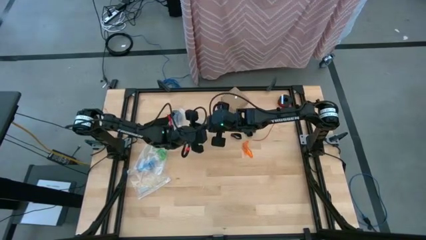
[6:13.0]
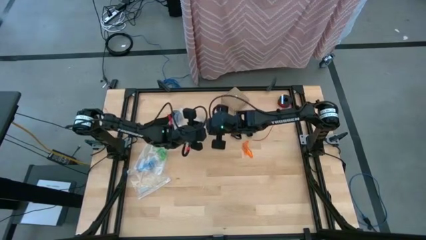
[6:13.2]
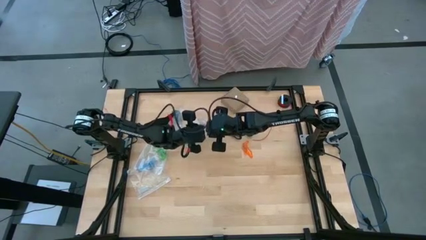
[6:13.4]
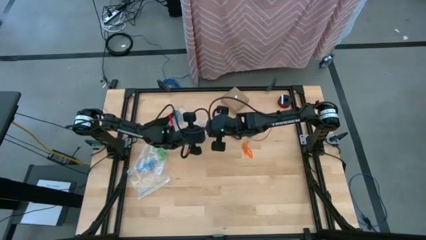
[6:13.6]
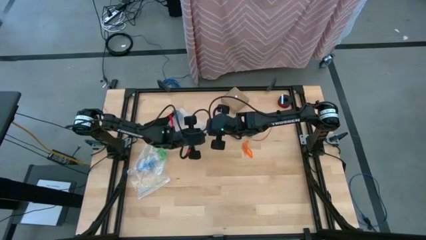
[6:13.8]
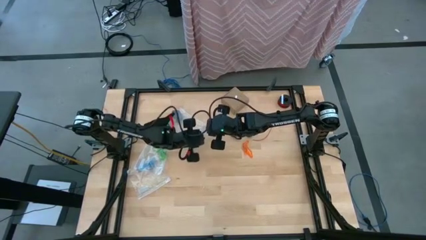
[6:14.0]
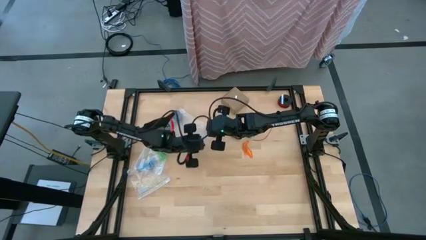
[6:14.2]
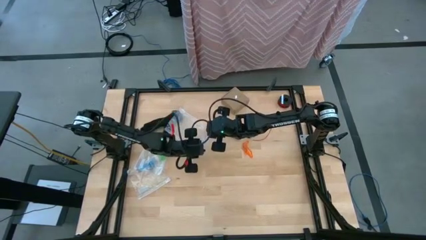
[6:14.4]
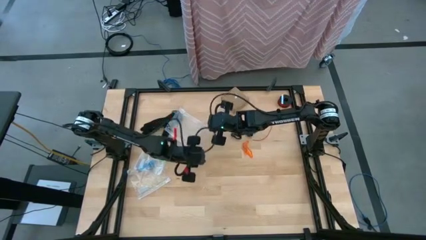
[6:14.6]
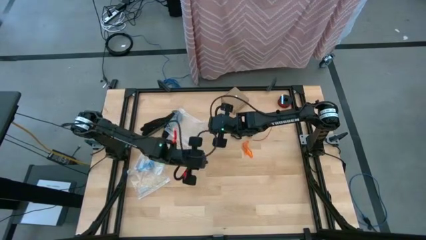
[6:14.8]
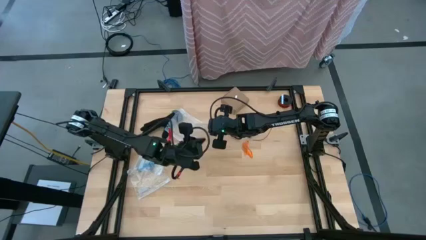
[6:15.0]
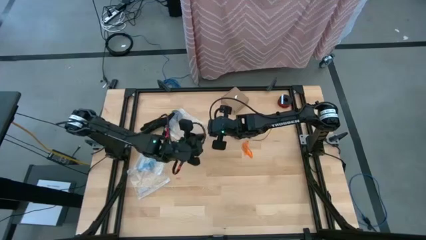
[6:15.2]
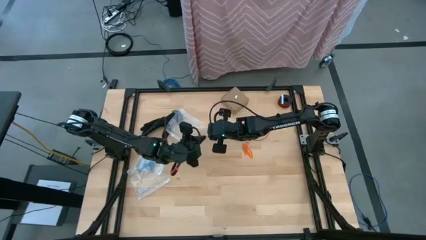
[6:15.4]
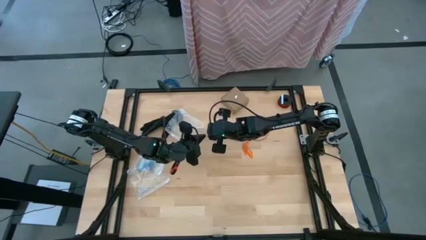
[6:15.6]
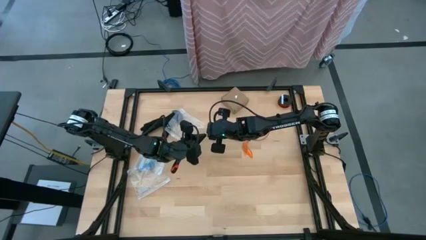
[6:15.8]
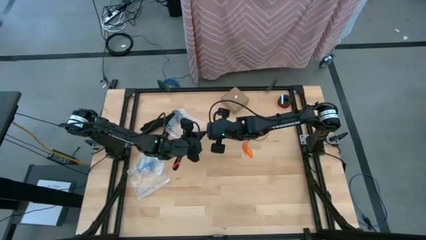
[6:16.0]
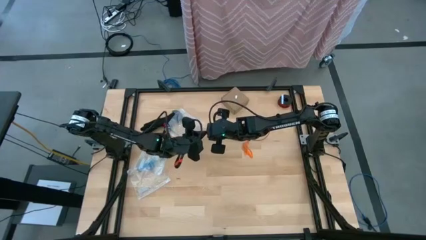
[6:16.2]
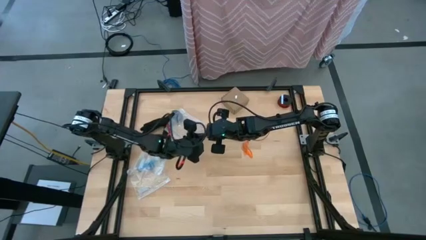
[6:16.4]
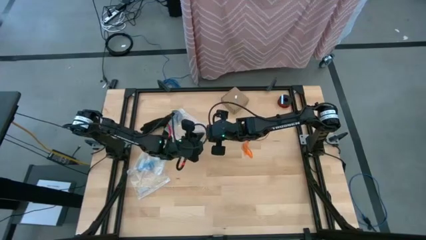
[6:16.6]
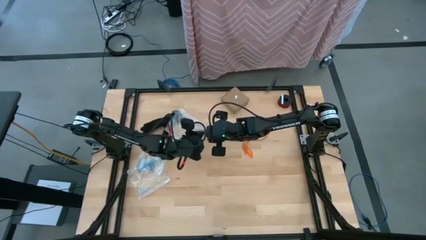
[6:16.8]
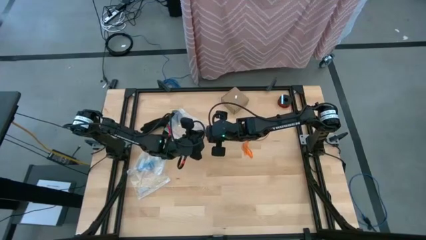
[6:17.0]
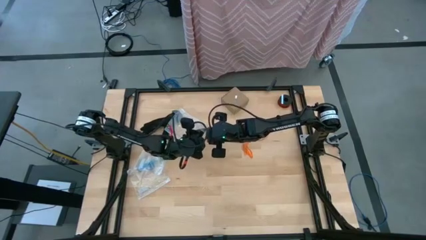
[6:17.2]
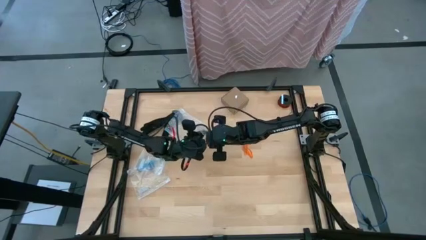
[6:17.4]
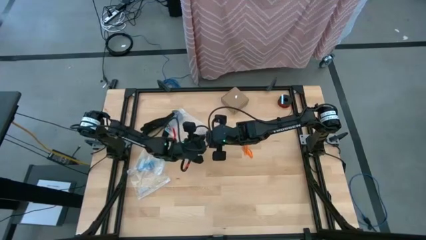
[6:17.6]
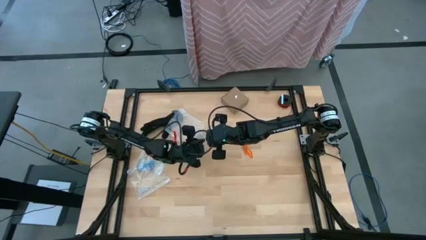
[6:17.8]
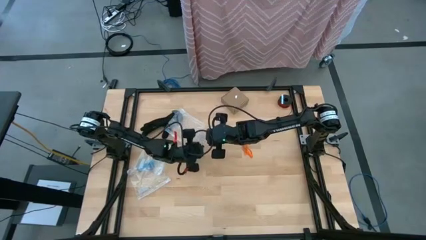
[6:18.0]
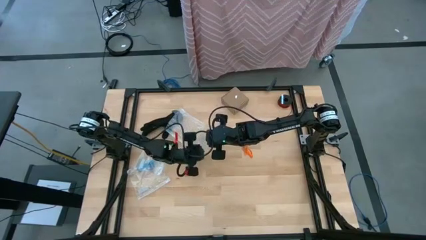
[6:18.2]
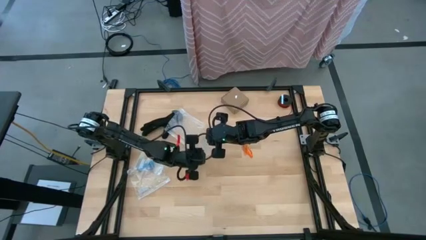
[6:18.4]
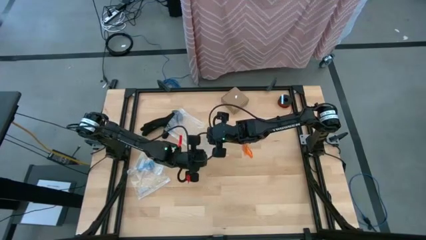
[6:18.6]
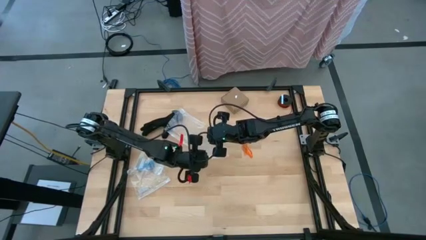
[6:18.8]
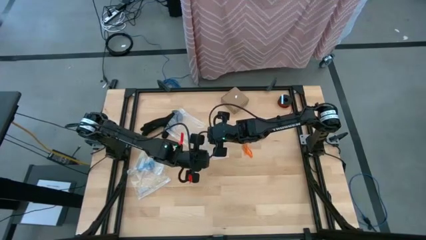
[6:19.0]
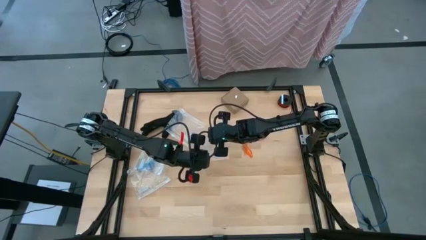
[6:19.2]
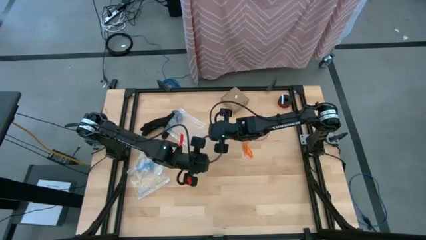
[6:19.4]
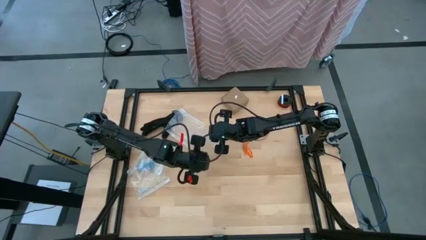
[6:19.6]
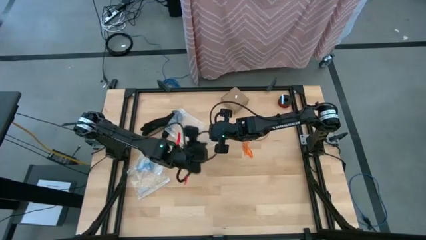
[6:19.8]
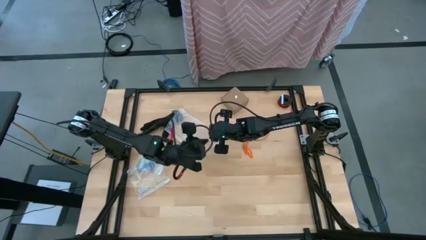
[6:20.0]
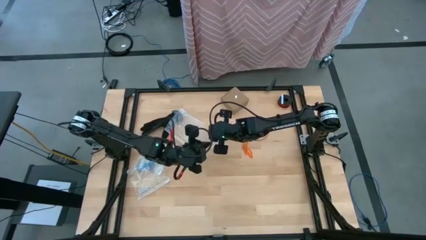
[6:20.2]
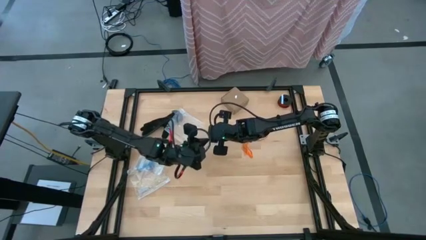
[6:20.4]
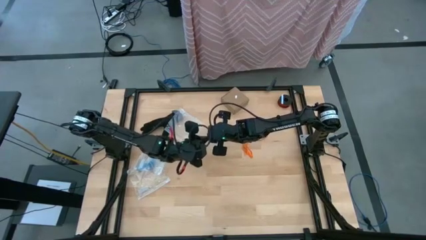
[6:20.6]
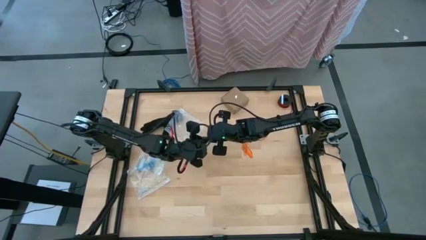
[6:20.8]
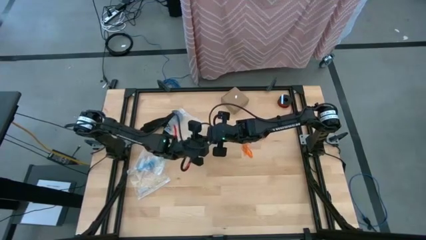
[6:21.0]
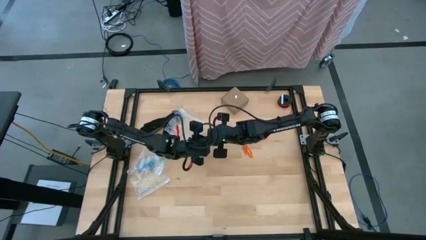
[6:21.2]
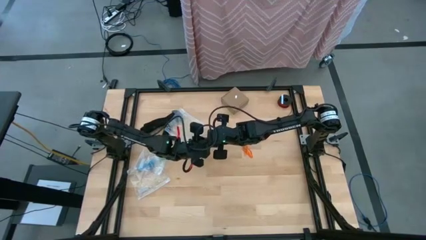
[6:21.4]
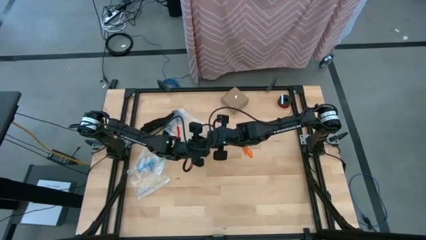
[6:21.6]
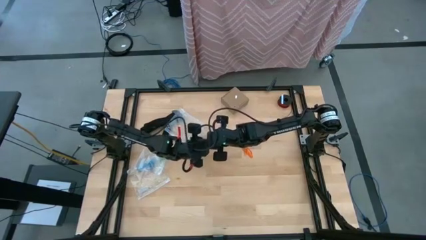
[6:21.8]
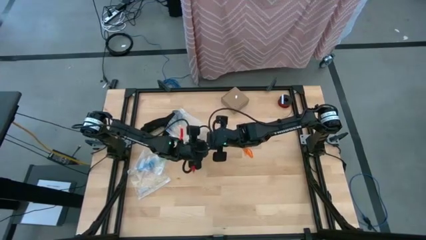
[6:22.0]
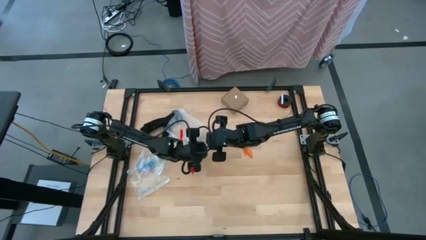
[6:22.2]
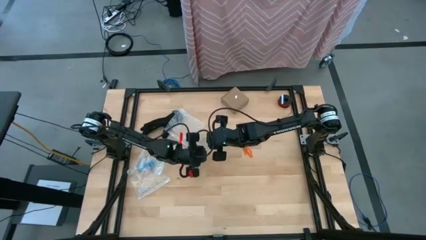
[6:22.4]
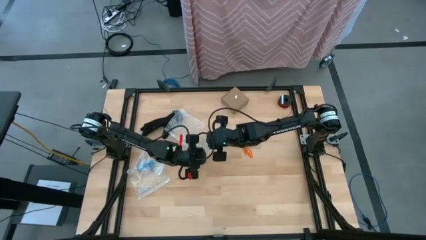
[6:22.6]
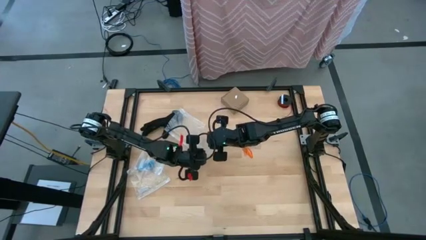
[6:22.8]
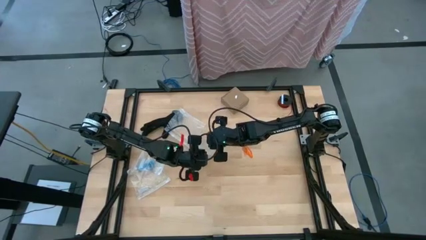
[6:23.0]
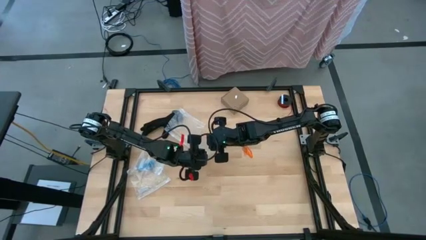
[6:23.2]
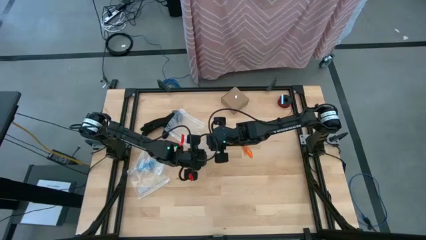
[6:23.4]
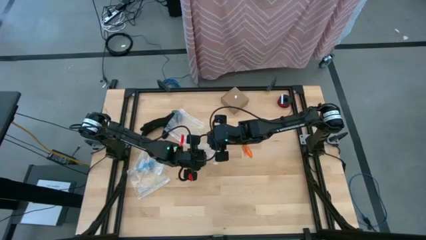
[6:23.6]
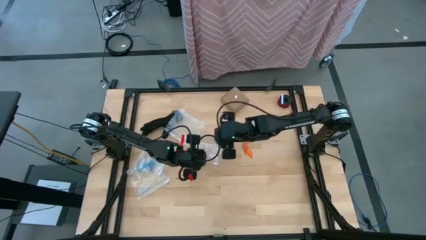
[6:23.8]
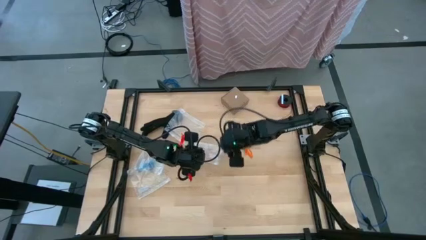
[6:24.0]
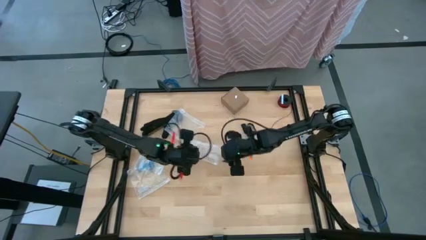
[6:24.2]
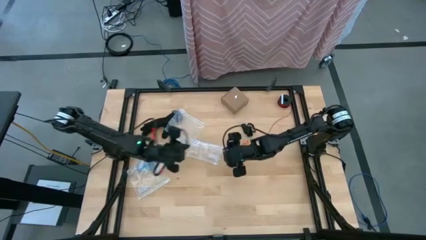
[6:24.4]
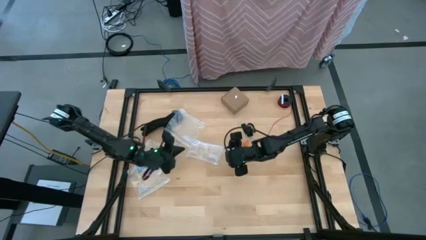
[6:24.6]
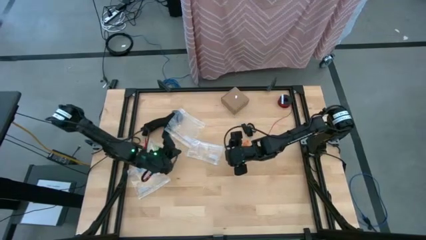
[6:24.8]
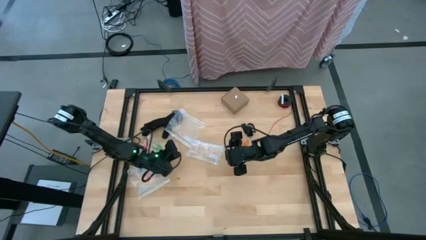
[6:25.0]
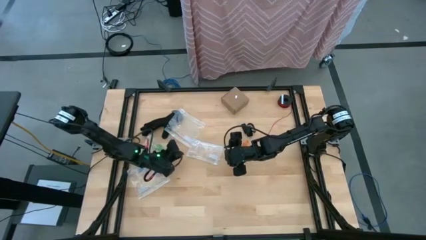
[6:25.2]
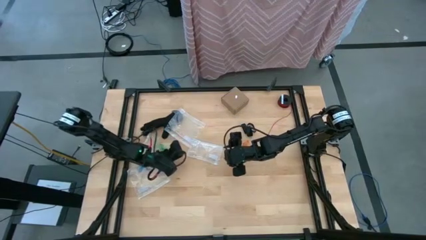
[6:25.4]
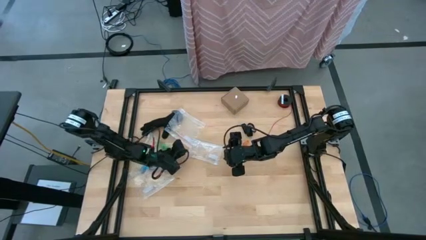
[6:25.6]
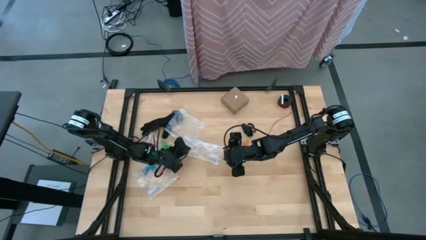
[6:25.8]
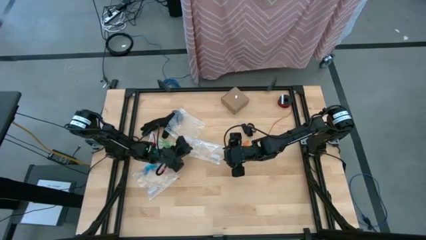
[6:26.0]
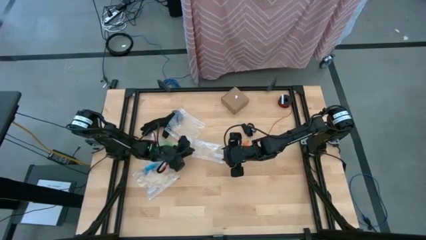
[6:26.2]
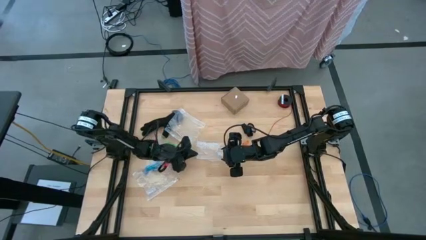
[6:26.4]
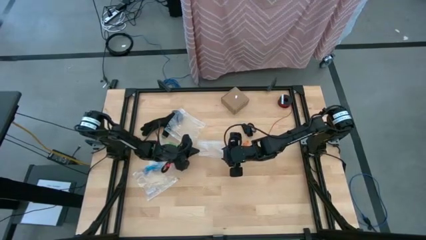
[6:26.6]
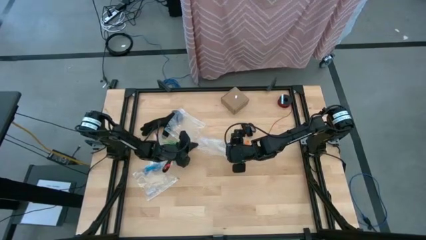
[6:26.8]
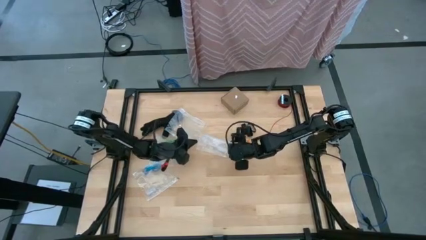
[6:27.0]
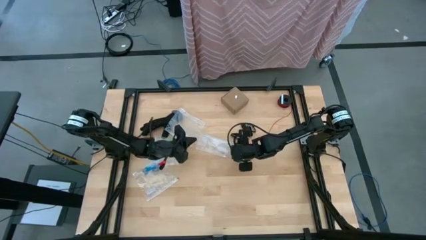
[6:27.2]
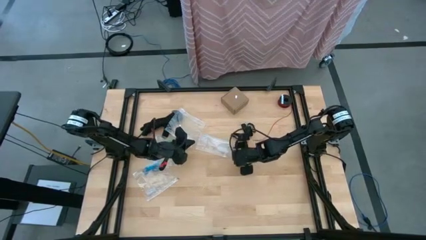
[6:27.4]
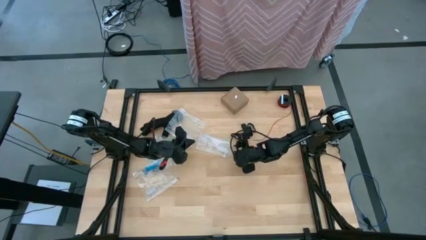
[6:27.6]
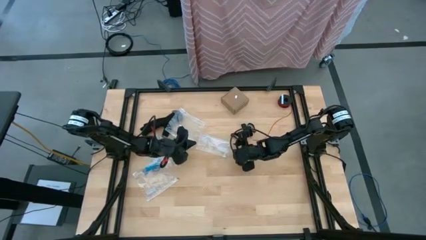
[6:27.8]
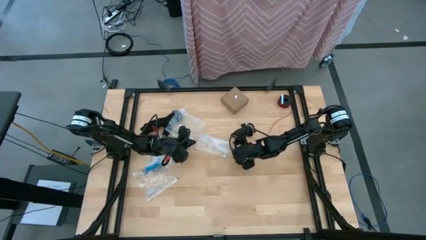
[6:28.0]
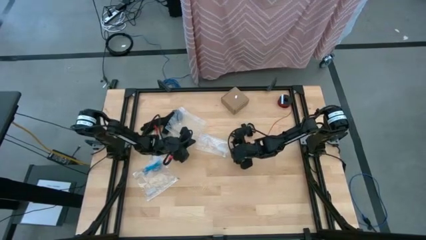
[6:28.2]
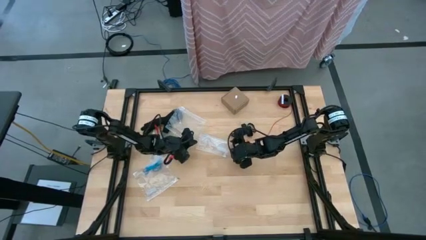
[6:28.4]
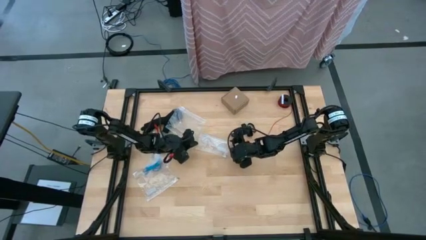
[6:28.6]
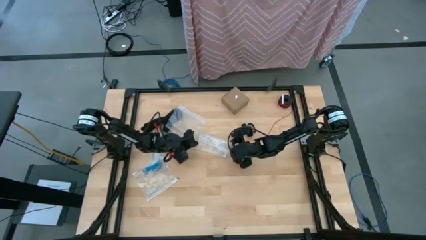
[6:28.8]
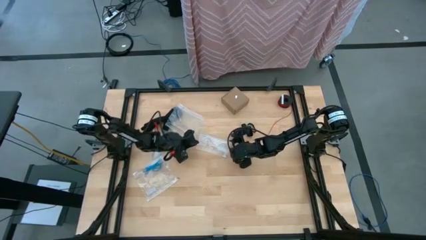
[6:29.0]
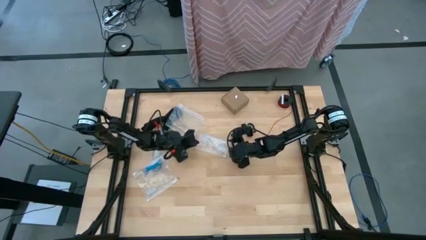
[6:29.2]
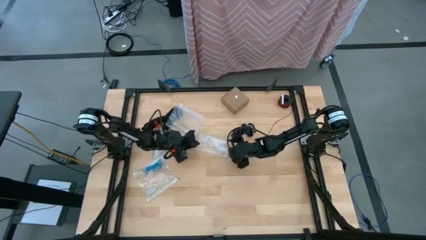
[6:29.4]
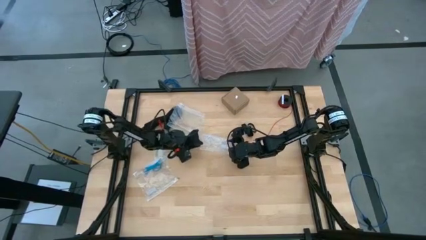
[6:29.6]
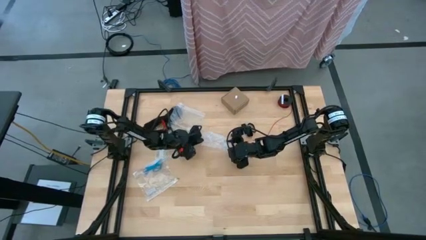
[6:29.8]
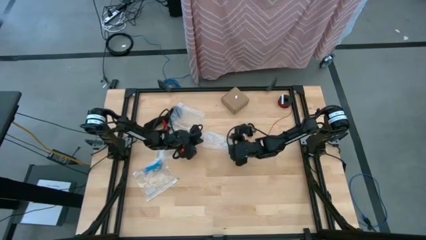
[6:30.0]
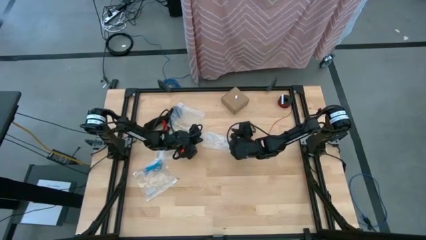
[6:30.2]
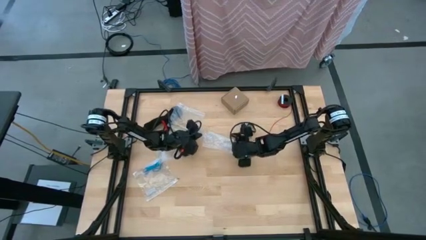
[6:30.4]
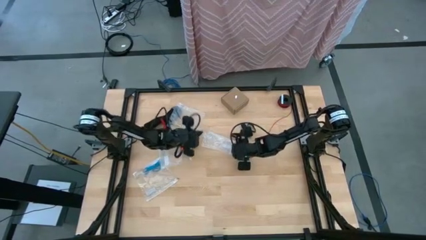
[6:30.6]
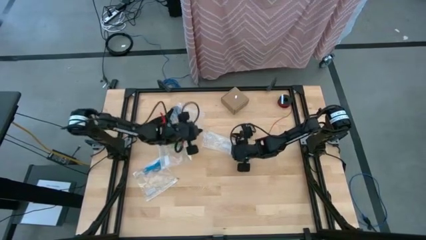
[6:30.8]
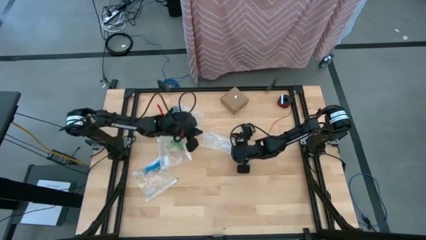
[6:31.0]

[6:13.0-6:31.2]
Task: Sort rubber bands
Open the transparent zip bag
